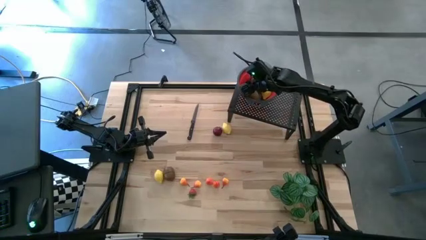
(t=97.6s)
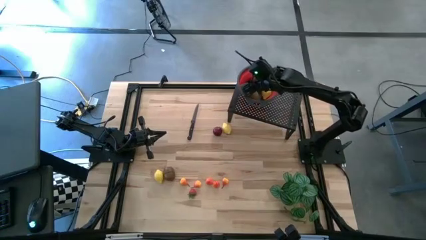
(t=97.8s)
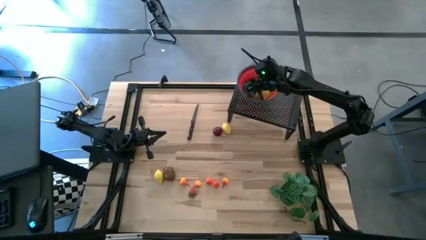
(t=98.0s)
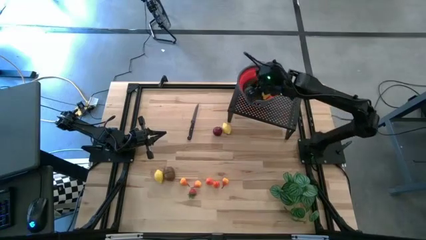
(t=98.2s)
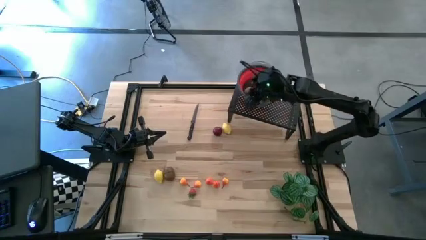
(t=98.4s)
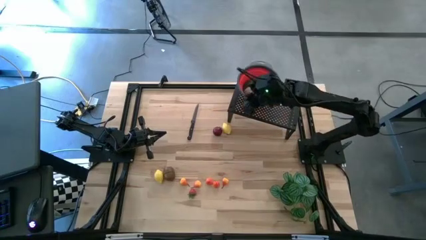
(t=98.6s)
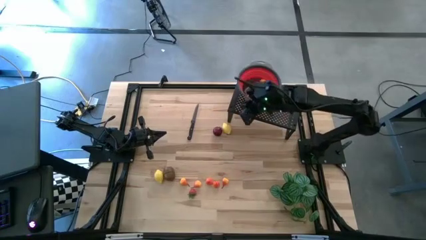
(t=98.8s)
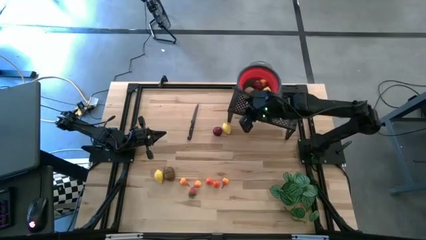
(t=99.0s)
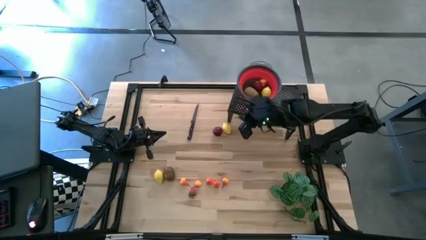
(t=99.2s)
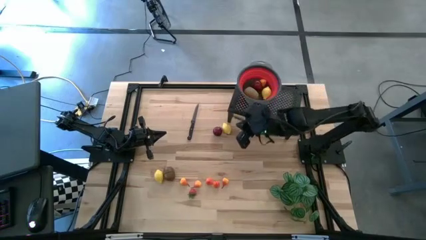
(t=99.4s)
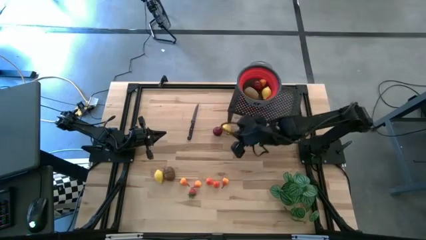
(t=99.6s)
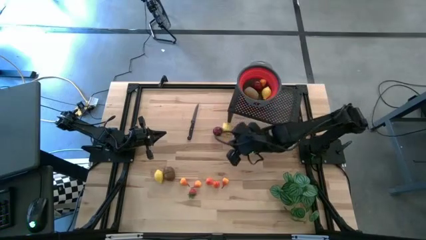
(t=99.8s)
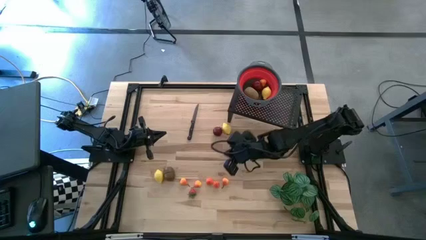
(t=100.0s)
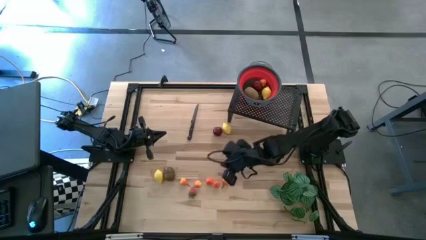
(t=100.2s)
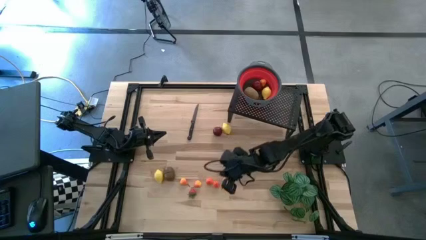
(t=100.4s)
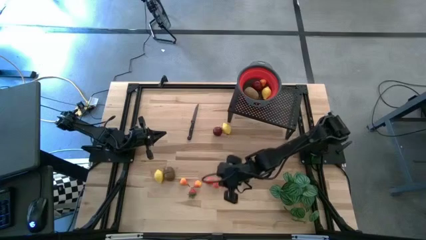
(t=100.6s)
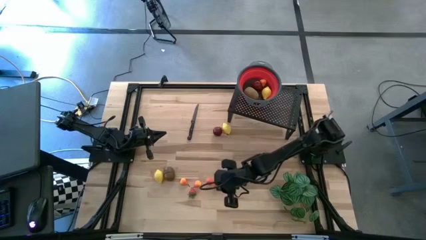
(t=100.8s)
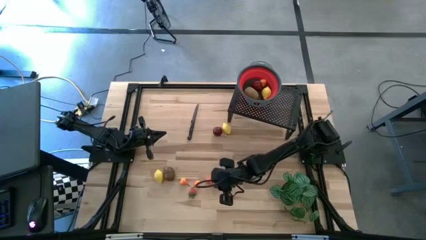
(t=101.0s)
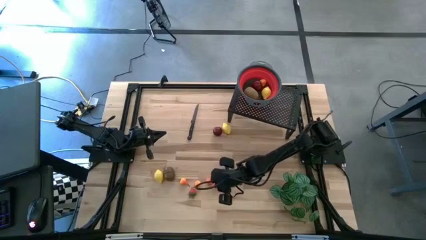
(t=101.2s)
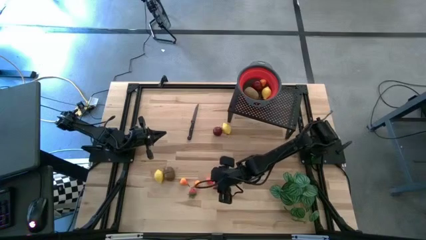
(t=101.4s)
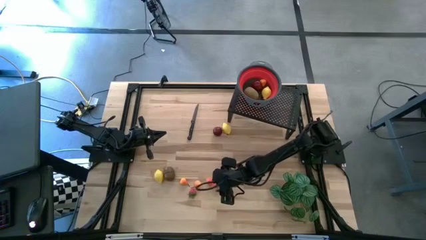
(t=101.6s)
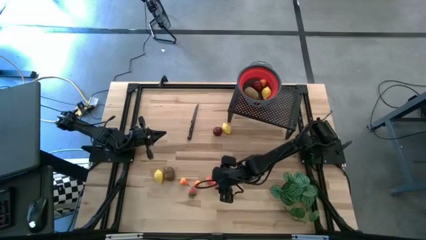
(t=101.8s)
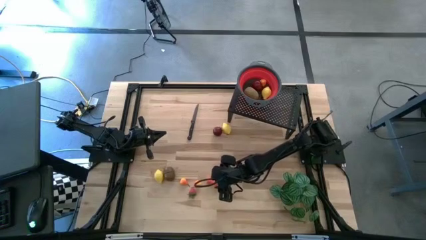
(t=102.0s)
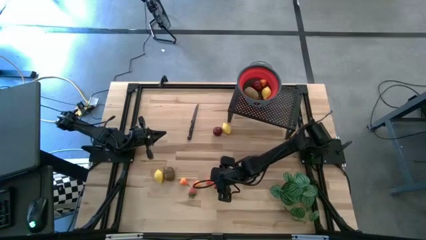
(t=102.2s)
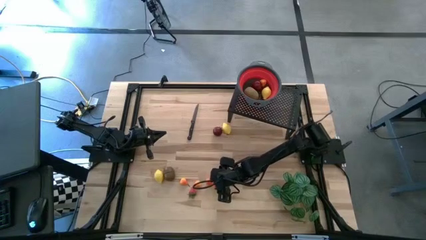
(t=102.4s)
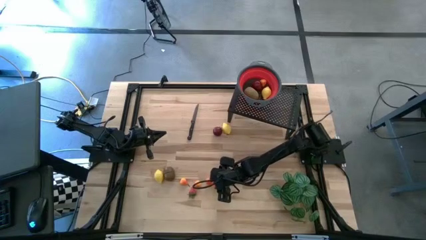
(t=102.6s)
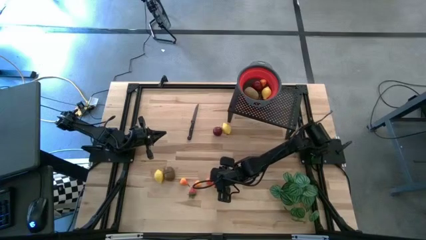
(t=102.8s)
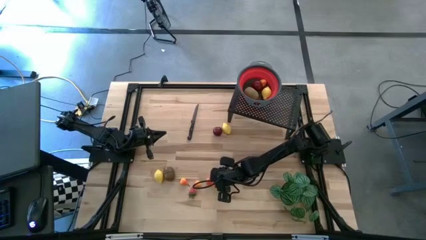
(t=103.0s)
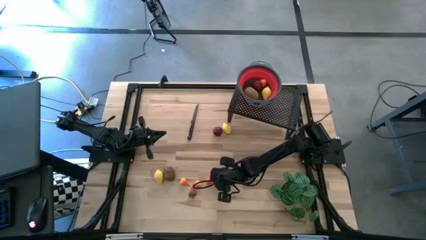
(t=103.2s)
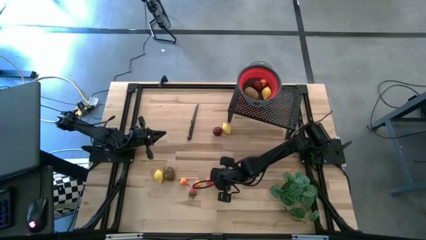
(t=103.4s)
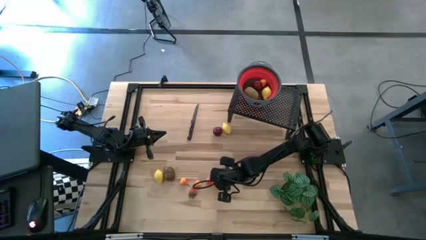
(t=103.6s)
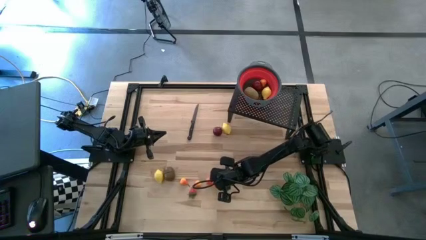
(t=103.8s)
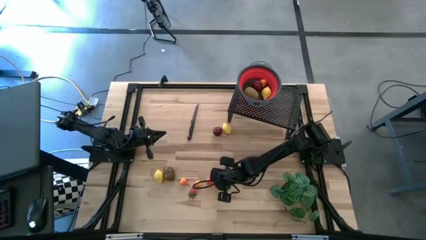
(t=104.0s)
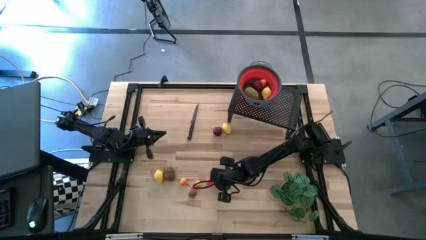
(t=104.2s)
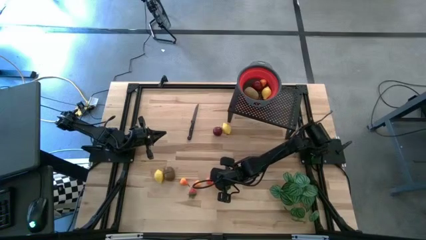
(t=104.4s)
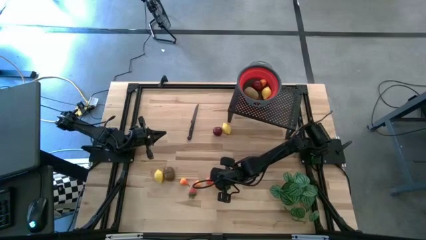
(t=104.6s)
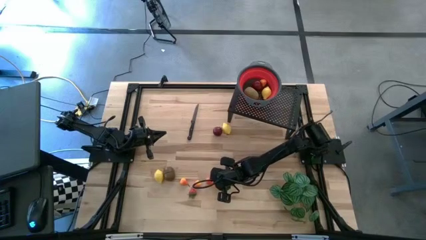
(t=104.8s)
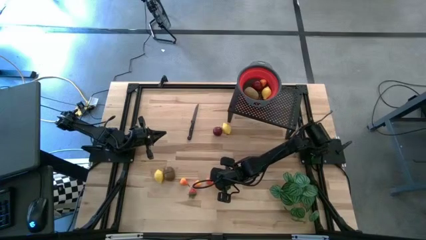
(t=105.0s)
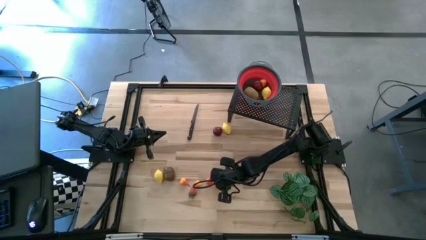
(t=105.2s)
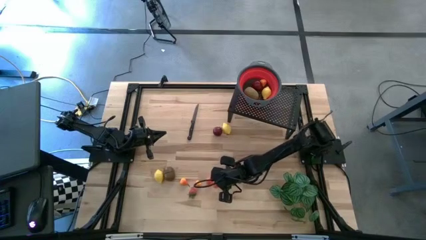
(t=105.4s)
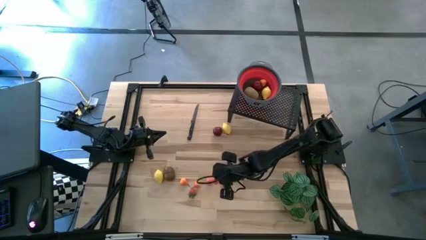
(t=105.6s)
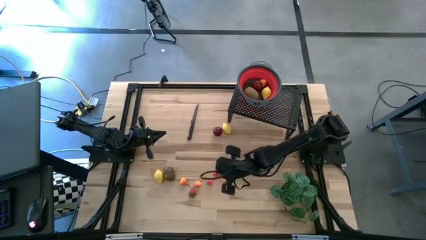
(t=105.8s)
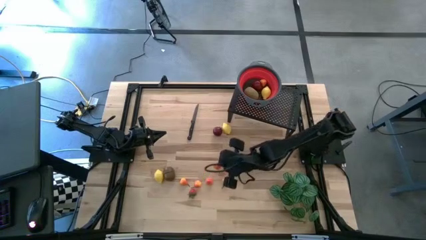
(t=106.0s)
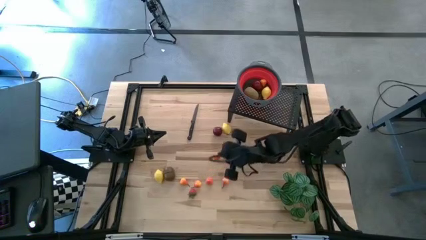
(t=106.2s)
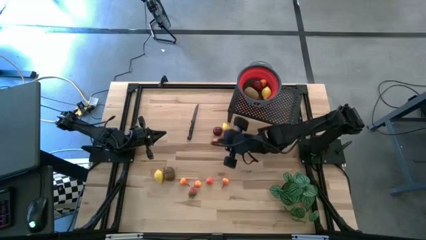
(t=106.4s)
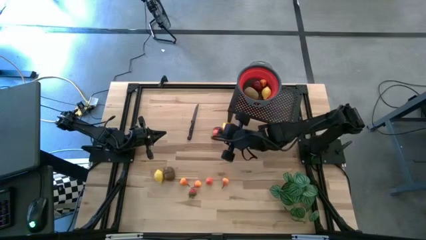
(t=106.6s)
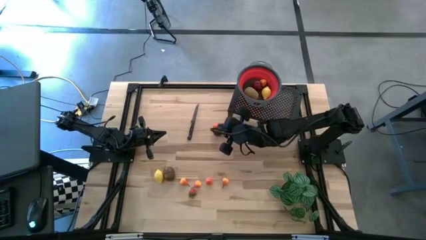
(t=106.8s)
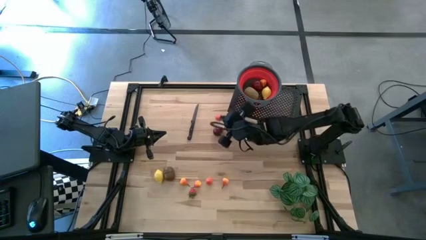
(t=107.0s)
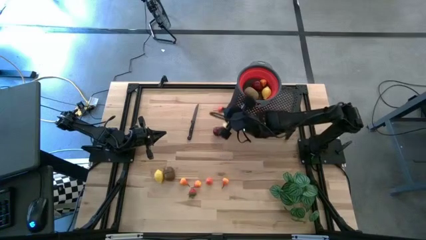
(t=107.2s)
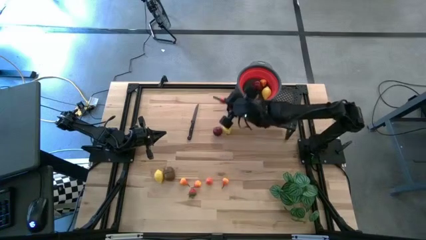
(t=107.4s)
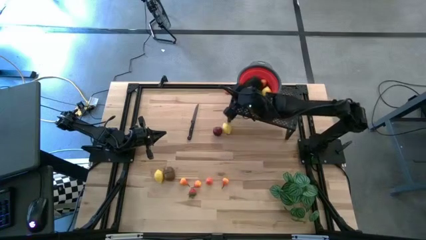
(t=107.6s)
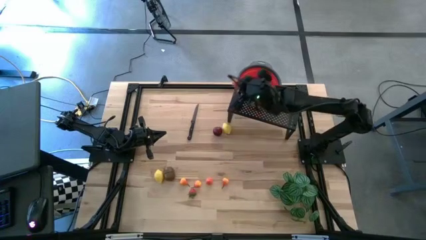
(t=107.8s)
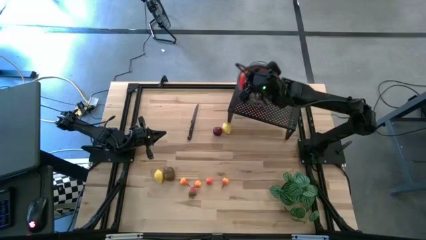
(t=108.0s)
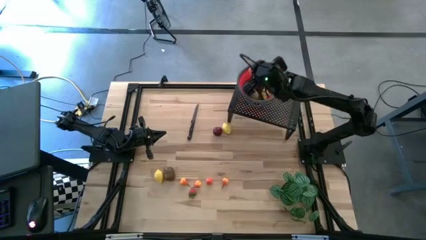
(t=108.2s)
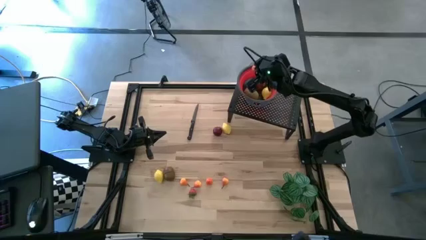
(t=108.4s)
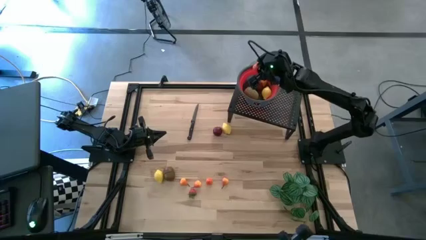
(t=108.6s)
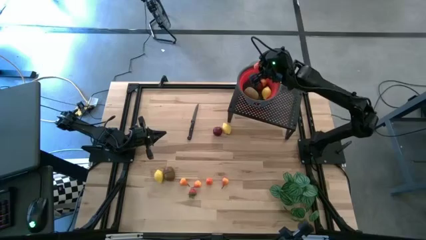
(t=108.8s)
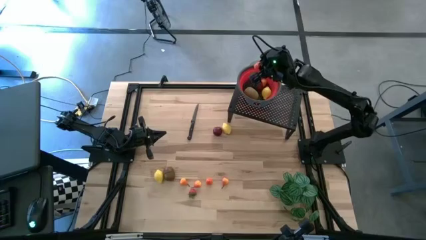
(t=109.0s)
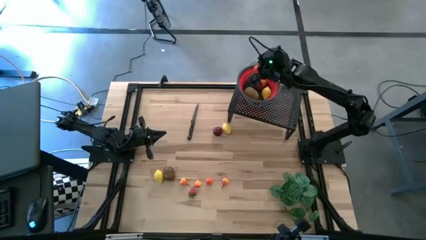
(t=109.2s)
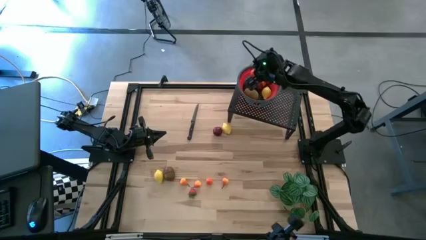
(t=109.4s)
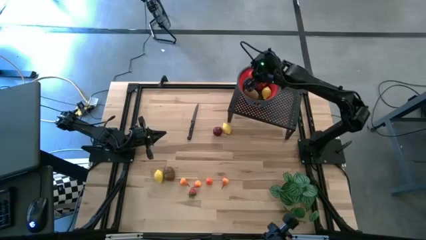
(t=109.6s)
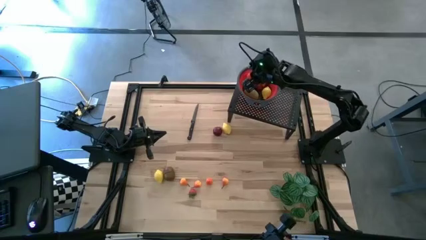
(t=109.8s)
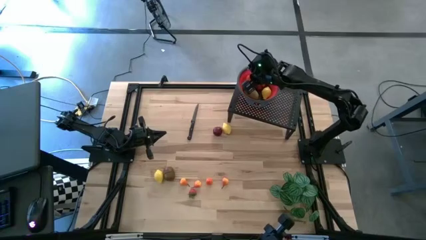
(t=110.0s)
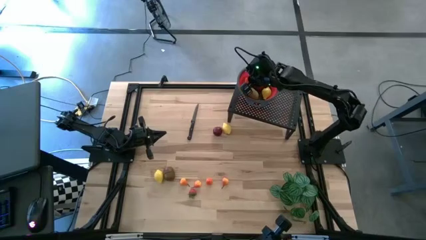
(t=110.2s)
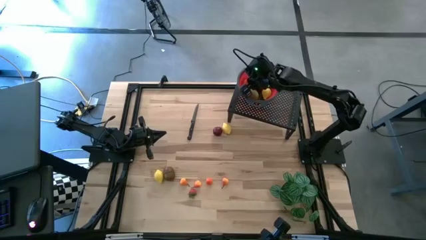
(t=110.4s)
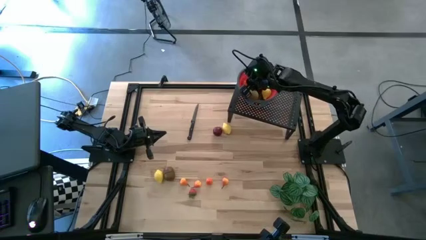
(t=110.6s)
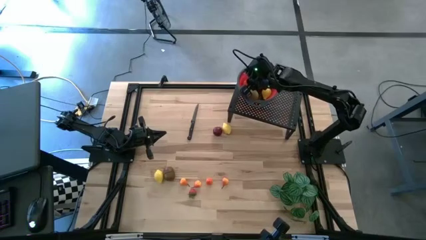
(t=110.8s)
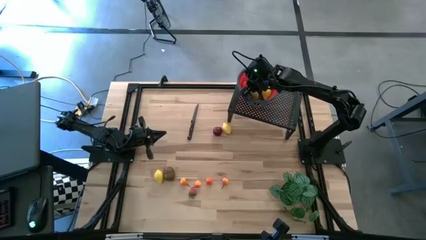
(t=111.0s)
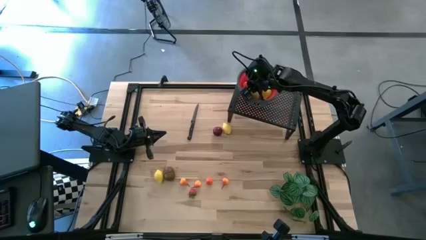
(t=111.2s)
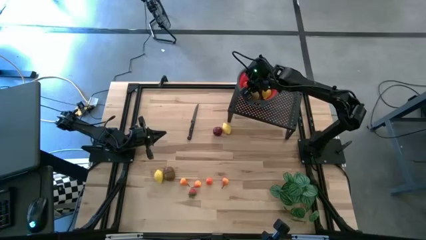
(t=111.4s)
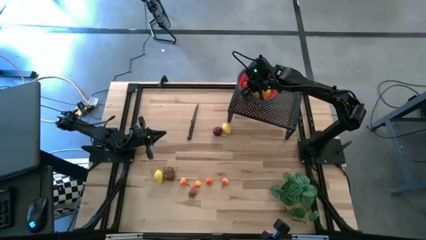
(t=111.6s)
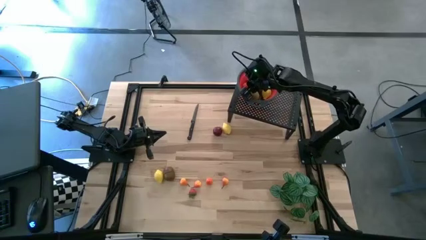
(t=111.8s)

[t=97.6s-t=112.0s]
Task: Pick & Place Fruit
Put the orange pear into the red strainer bowl on the shelf

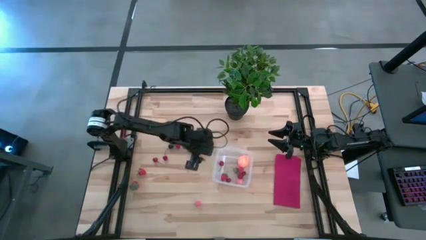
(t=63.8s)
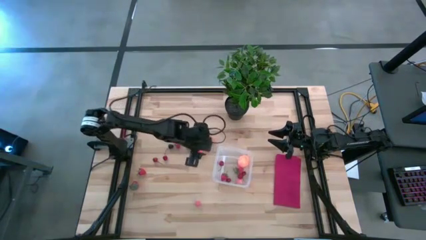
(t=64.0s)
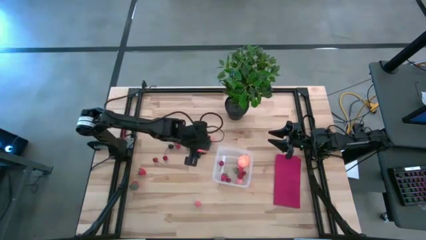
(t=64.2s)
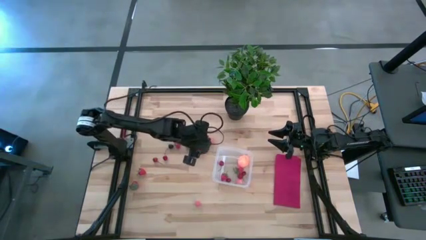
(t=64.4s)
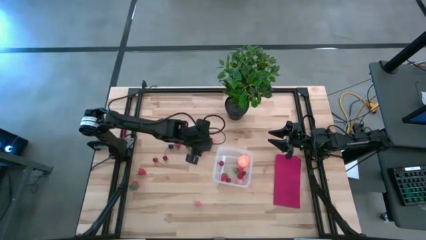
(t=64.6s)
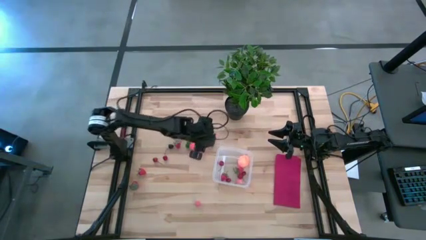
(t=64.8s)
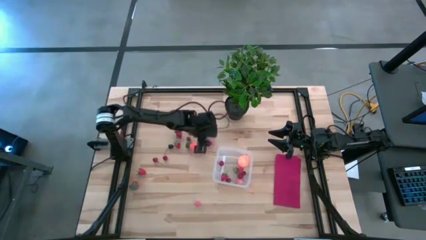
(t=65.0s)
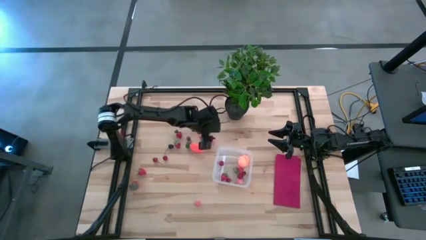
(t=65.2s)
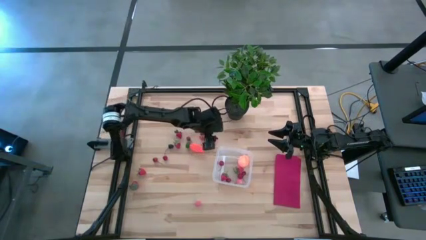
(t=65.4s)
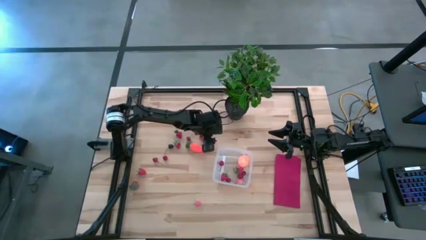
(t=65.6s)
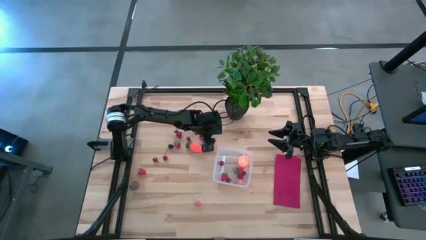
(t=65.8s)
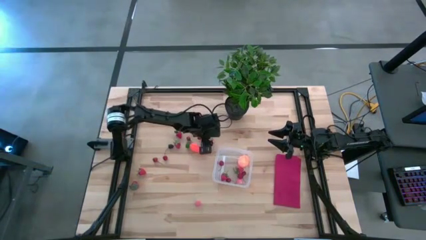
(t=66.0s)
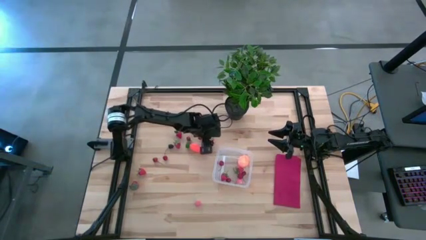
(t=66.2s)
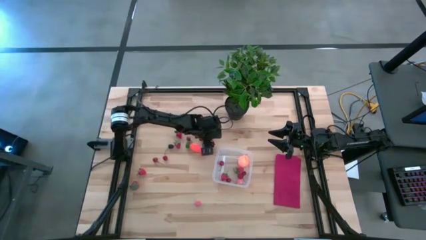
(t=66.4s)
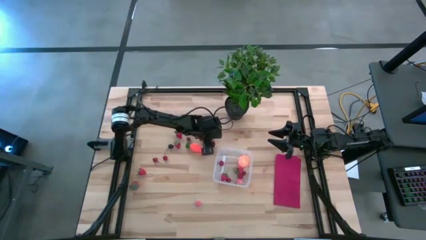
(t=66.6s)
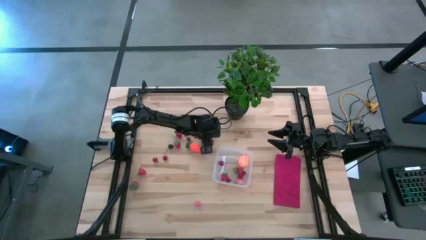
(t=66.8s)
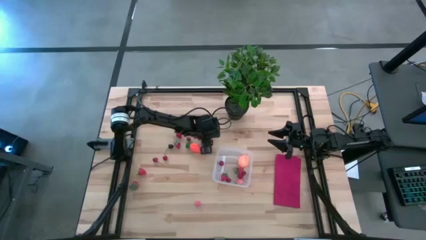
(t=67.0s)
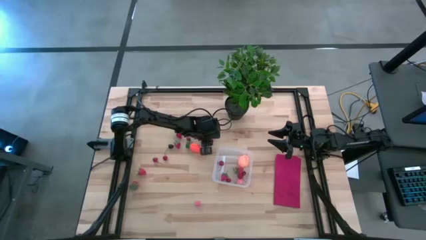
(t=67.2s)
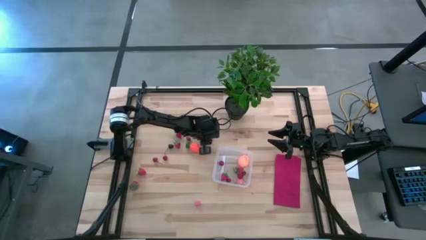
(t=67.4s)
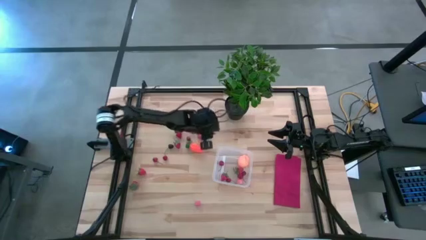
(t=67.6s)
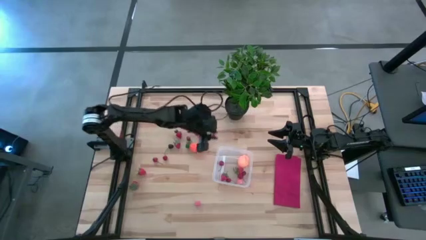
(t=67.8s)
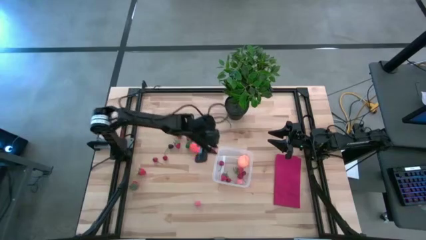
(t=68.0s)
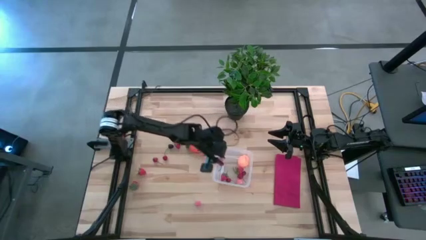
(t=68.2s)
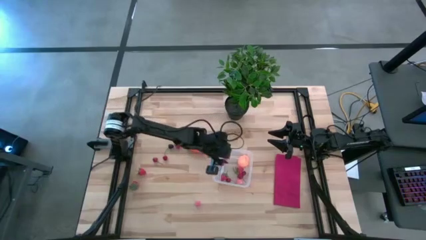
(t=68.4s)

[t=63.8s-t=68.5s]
Task: Pick and placing Produce into tupperware
Put the pink peach into the transparent bin
